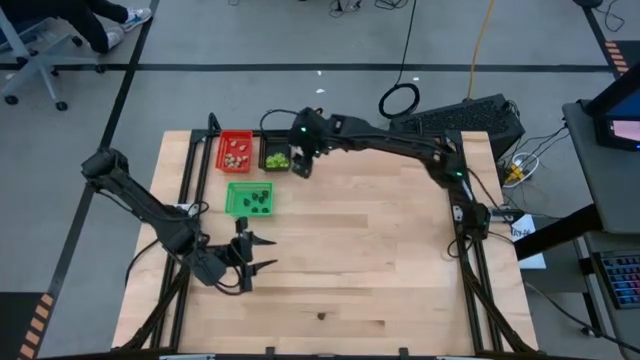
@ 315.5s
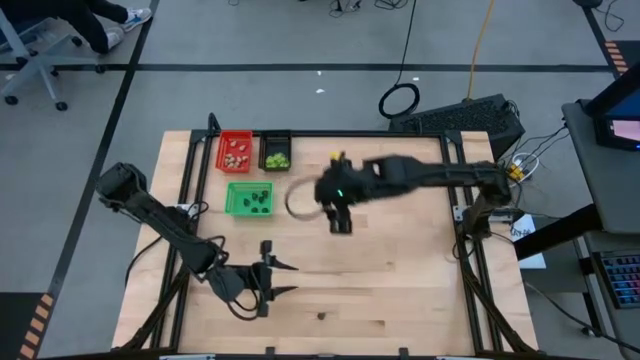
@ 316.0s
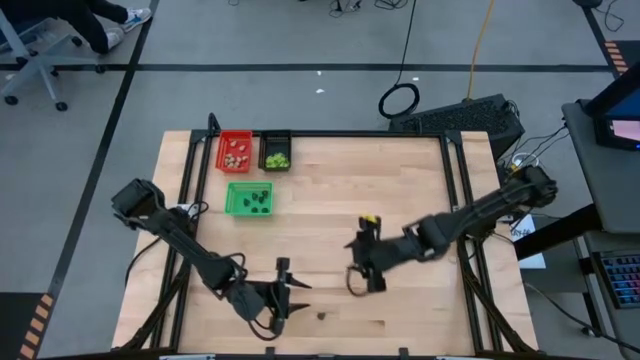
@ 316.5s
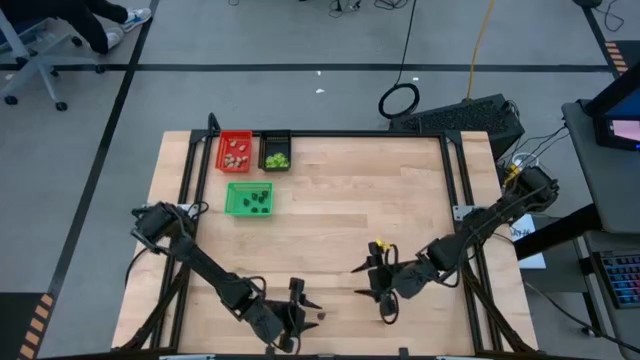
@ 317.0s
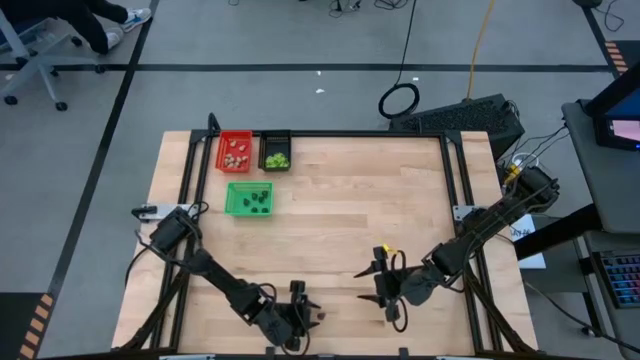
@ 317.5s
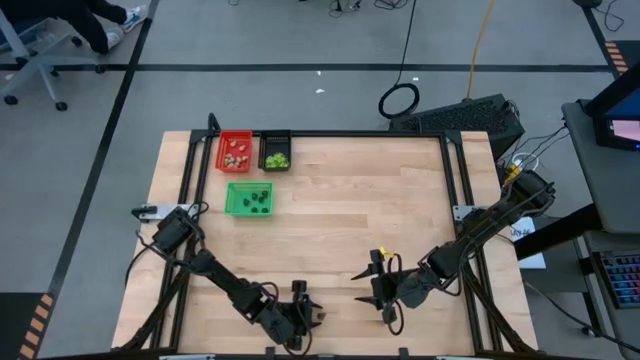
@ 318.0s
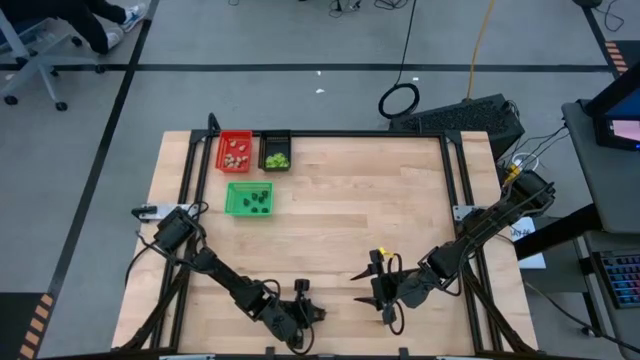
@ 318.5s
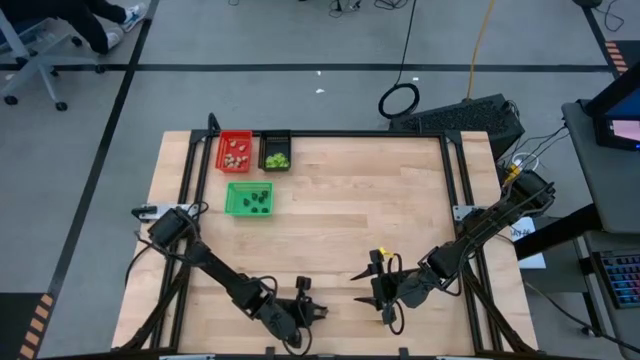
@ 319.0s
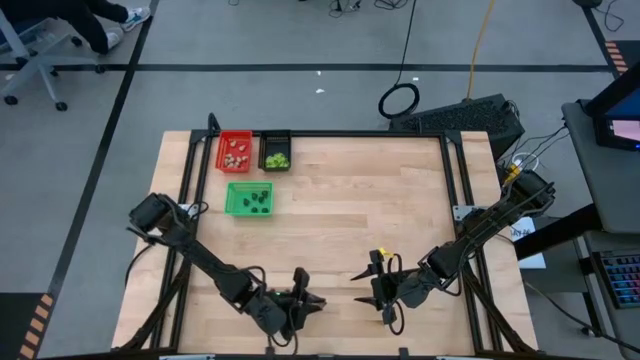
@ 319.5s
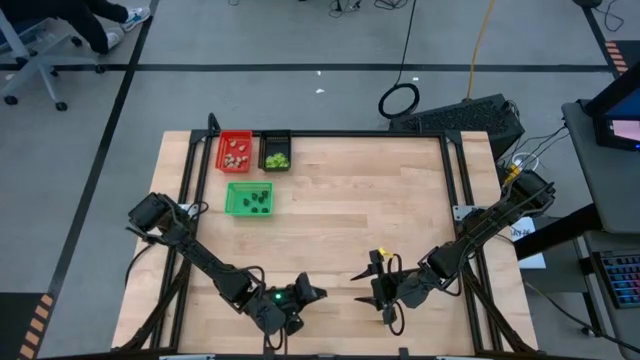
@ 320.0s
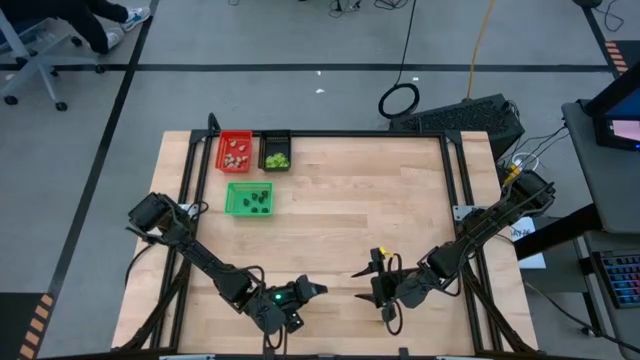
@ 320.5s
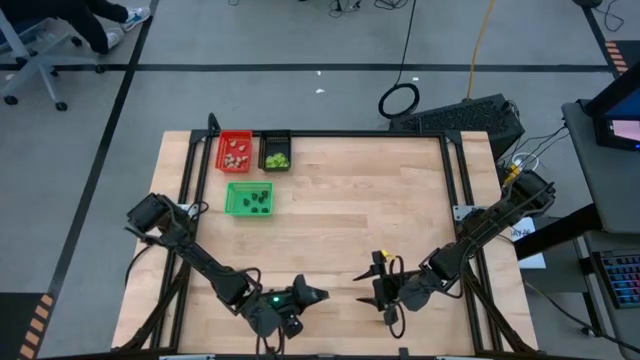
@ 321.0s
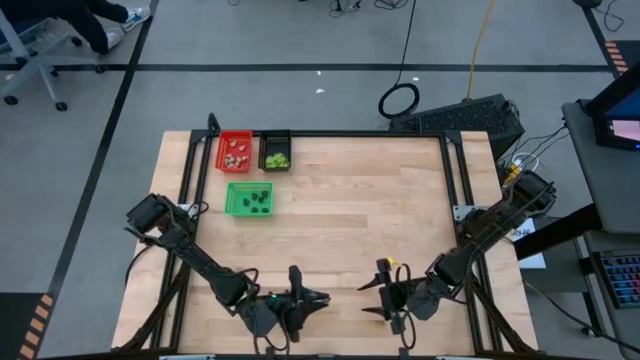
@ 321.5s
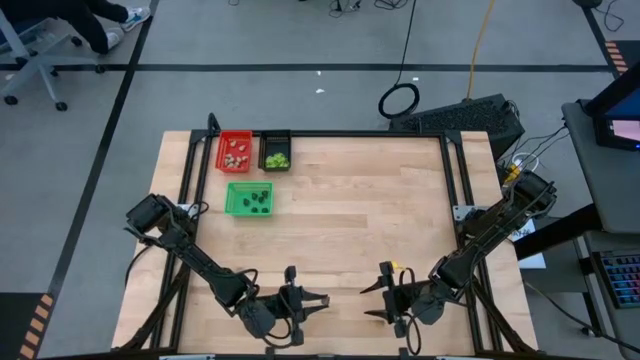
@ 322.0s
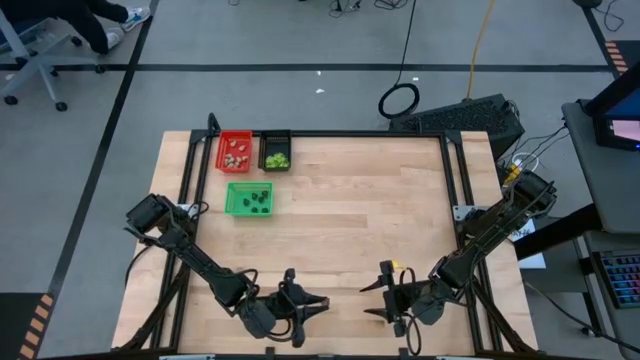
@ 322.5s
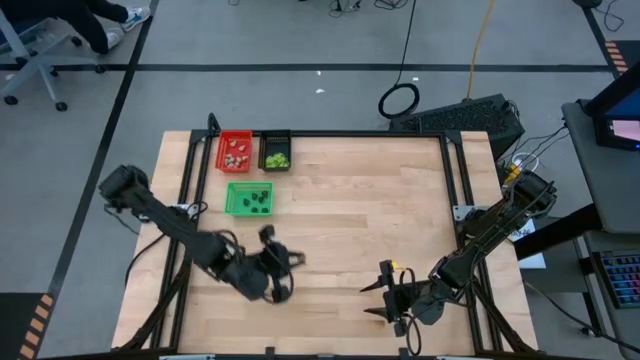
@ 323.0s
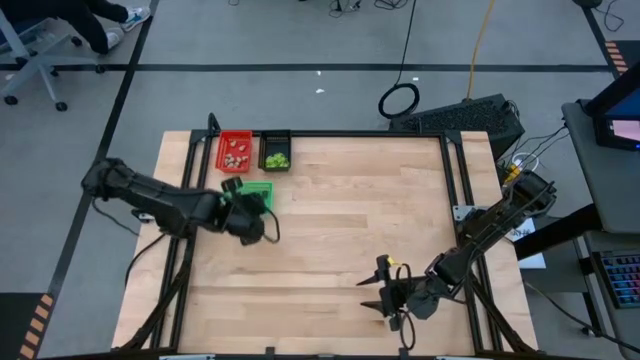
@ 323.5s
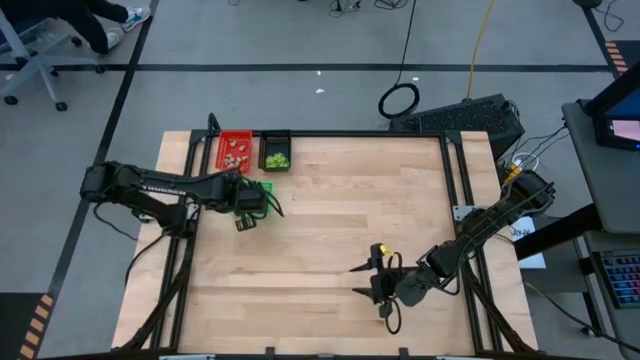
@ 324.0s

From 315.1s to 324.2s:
Task: Sort Halloween decoration
Put the black skull toy into the green bin

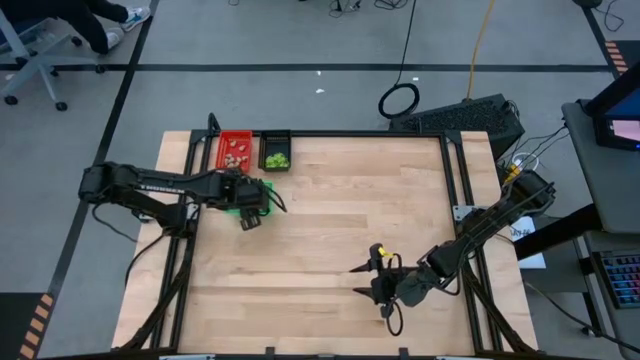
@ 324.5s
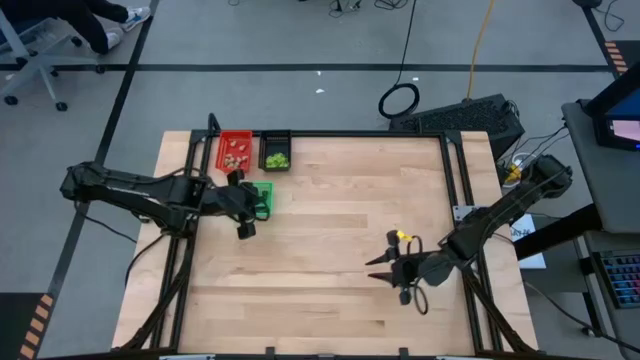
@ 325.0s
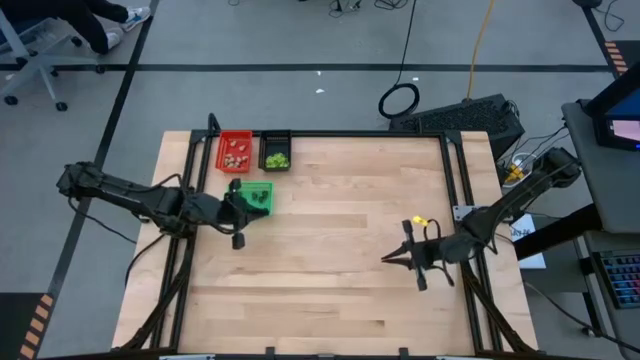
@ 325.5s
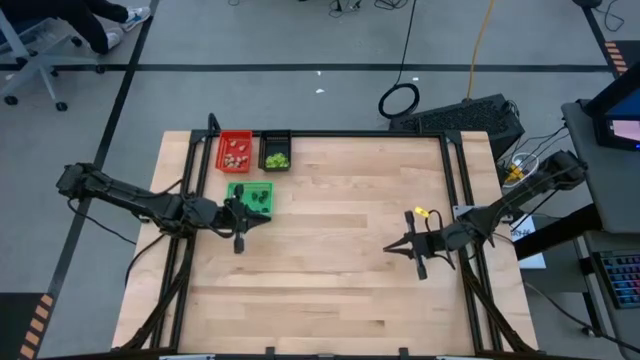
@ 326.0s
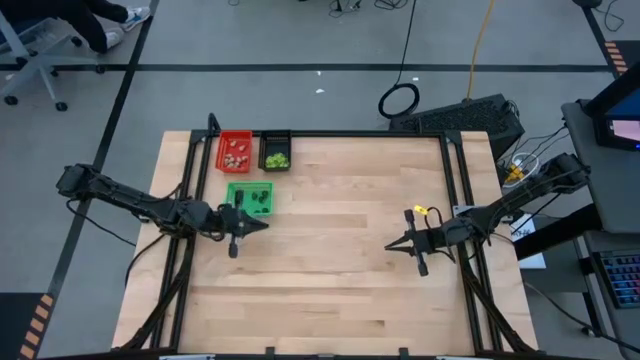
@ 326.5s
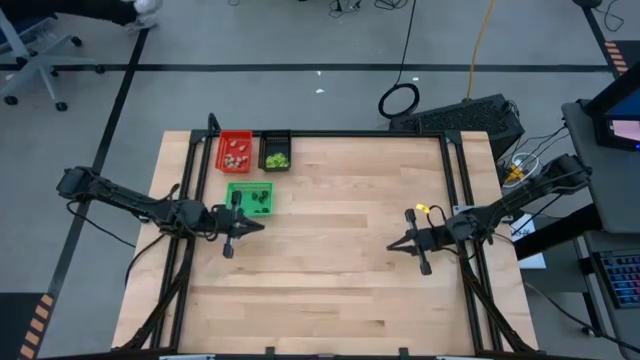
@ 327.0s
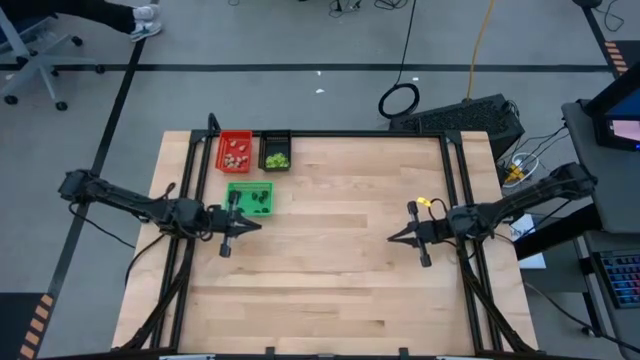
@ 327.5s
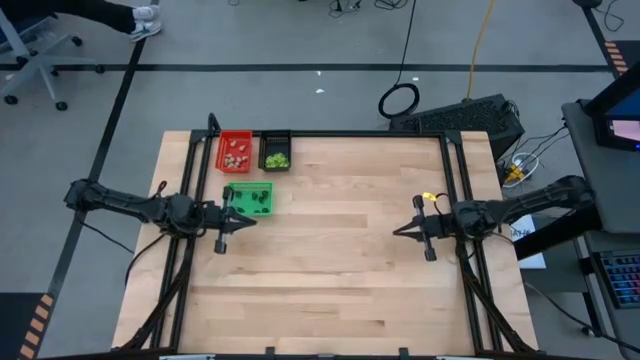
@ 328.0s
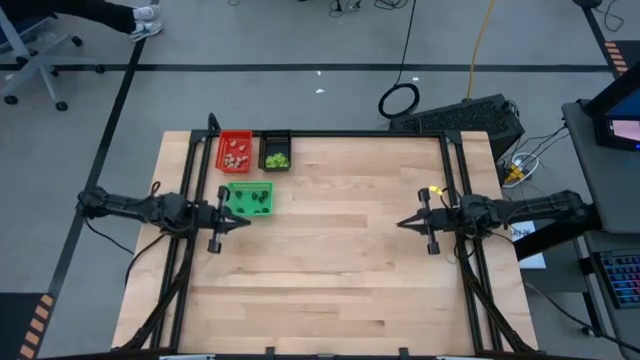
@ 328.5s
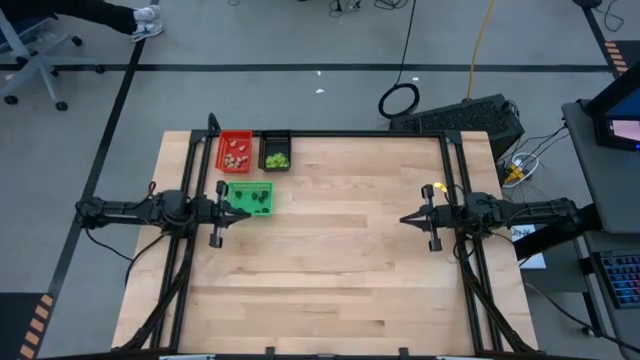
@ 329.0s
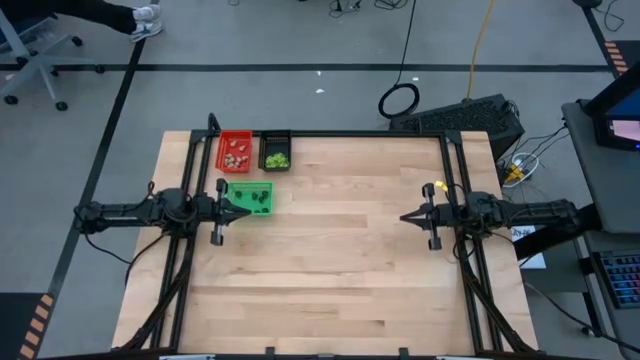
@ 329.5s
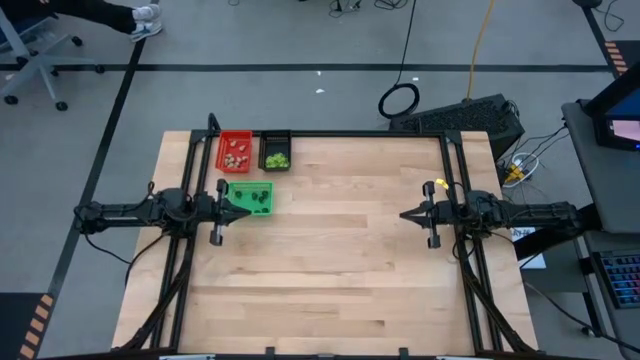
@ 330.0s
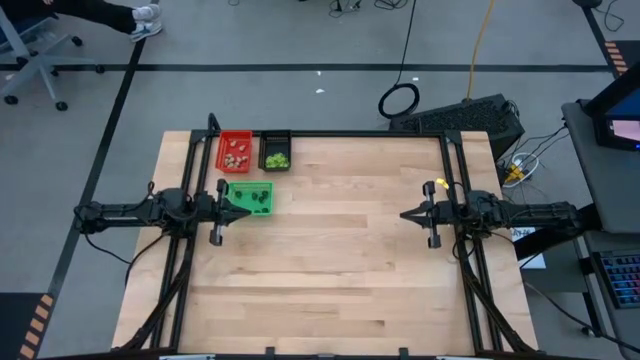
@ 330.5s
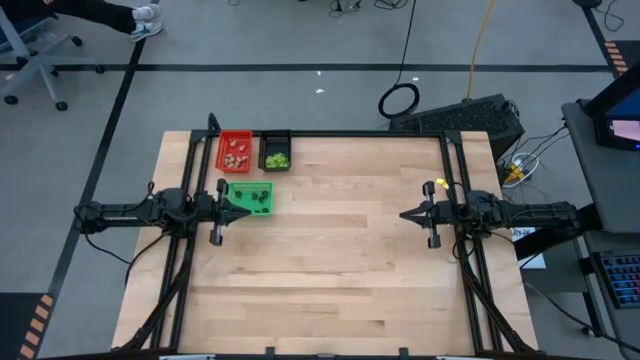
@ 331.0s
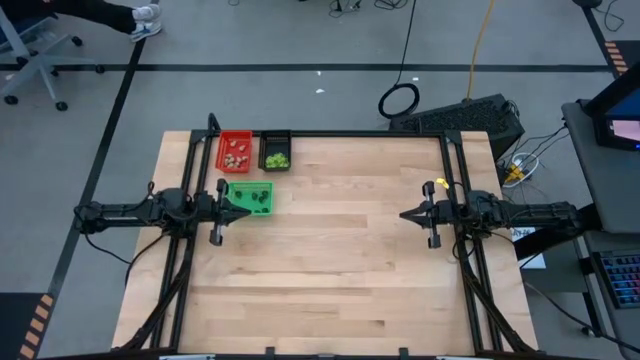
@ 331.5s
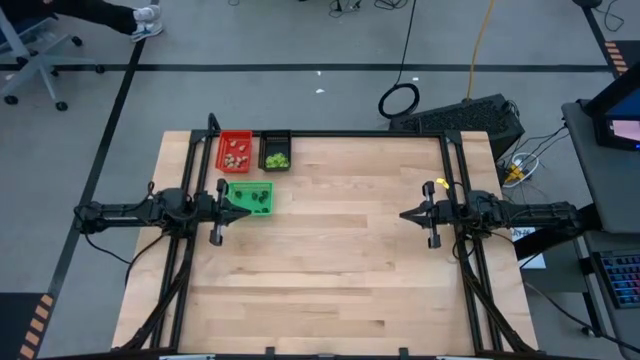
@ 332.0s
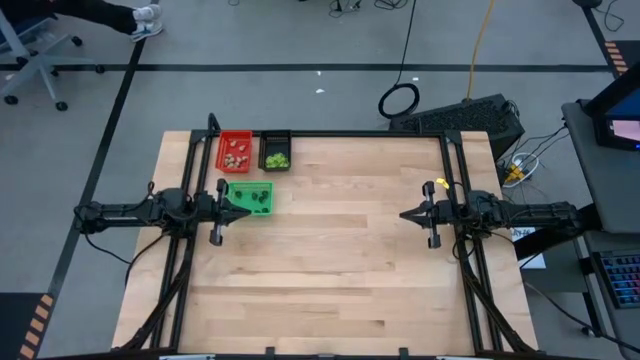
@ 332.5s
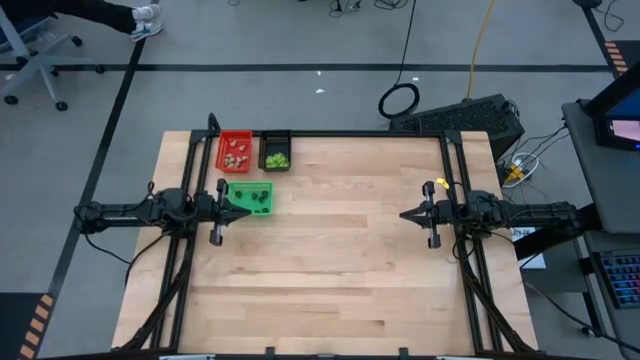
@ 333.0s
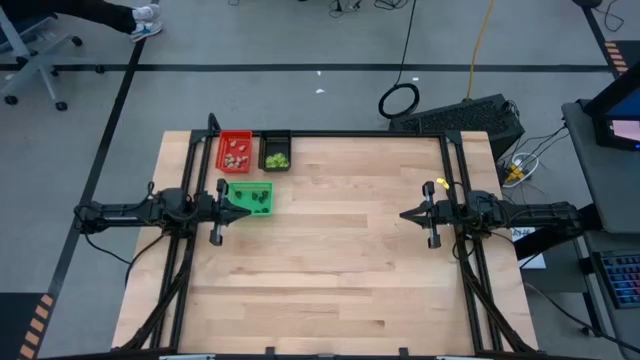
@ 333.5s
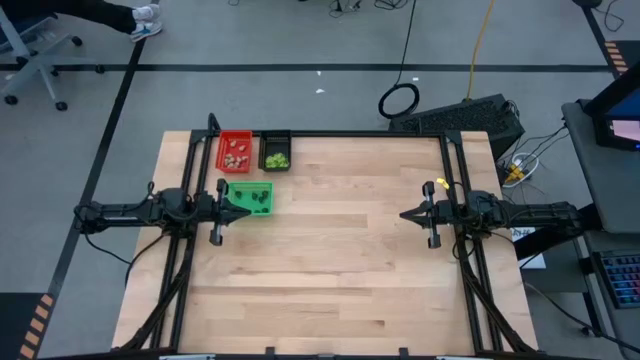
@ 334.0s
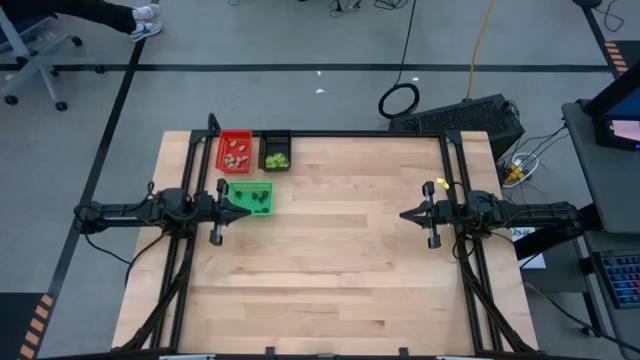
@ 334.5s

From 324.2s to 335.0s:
Return to Home Position

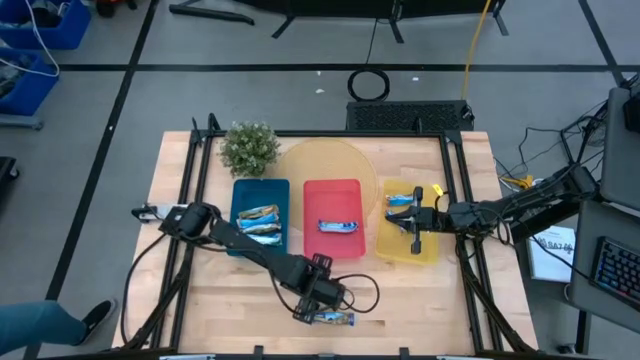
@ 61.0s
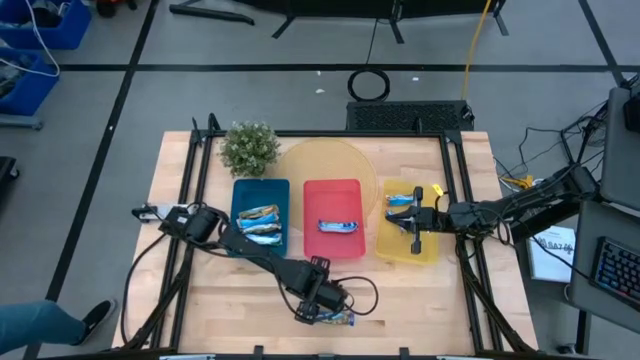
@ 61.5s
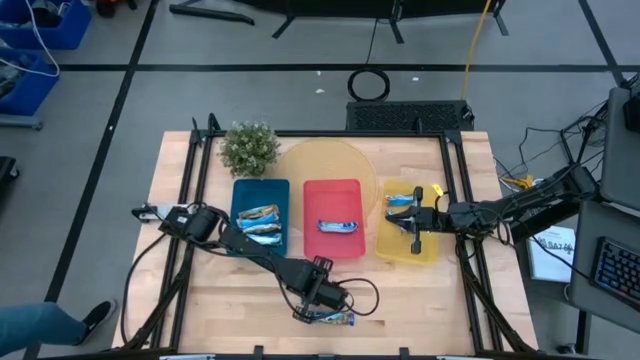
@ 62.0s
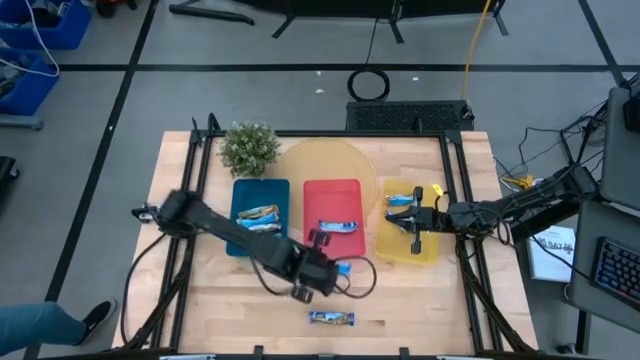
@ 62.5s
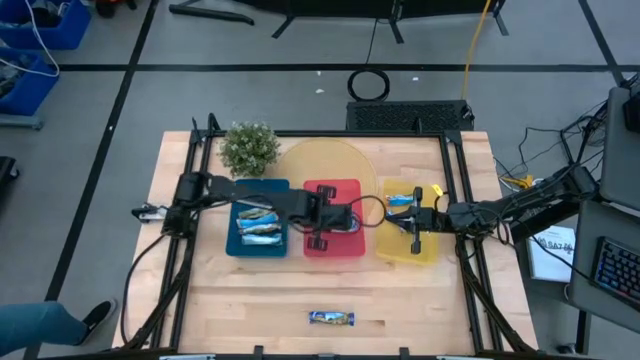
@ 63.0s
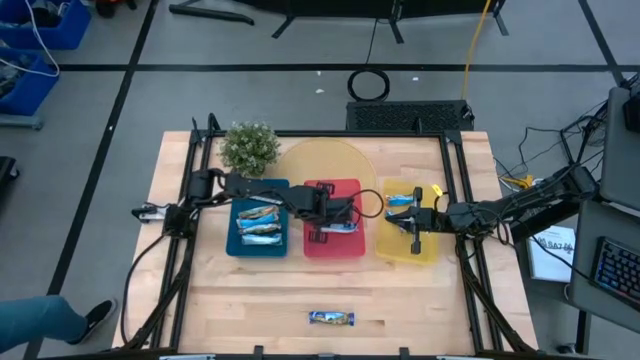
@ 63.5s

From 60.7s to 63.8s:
Task: Pick and place Granola Bars by type
Put the blue granola bar into the red bin
